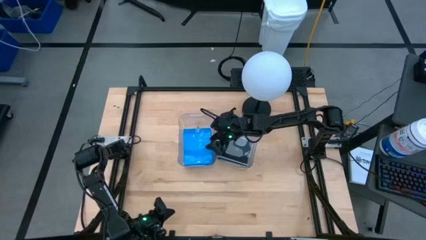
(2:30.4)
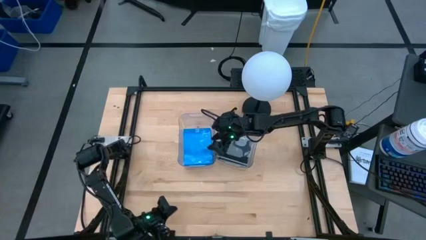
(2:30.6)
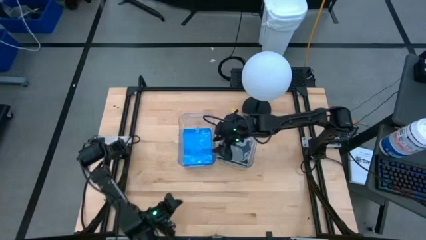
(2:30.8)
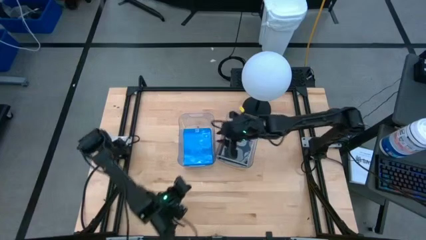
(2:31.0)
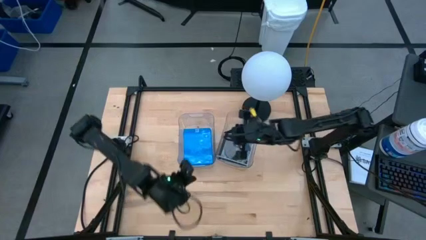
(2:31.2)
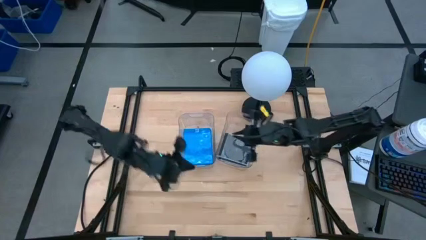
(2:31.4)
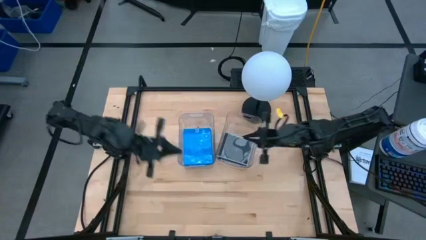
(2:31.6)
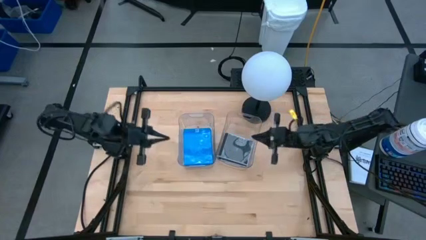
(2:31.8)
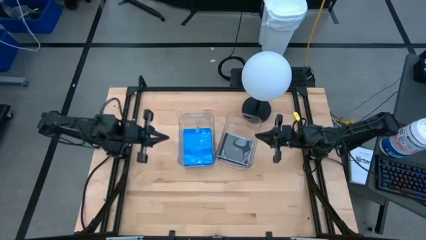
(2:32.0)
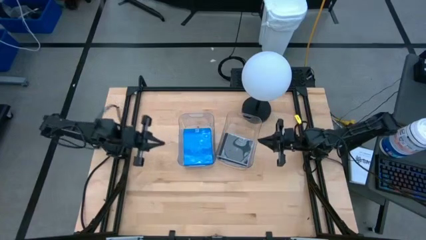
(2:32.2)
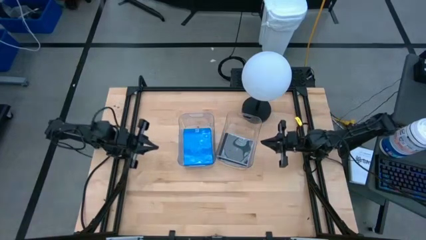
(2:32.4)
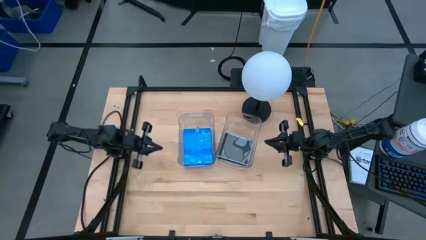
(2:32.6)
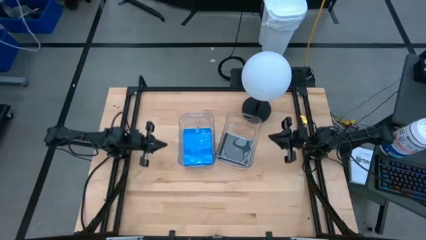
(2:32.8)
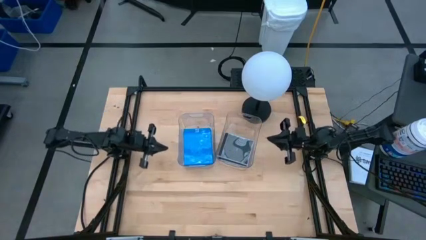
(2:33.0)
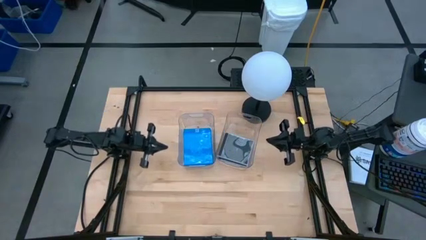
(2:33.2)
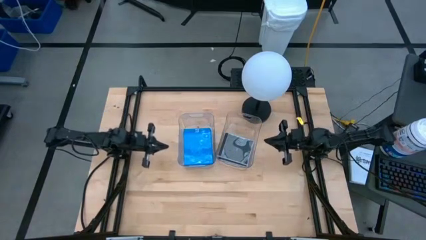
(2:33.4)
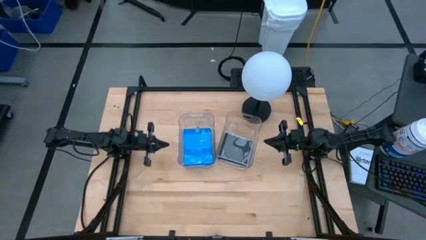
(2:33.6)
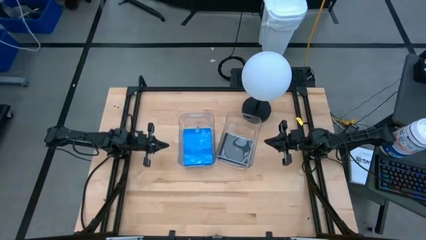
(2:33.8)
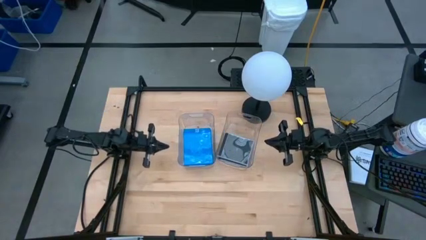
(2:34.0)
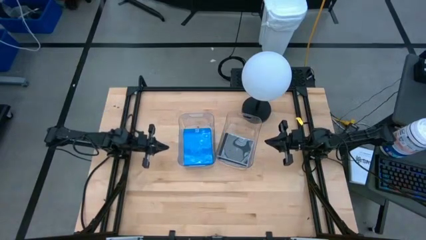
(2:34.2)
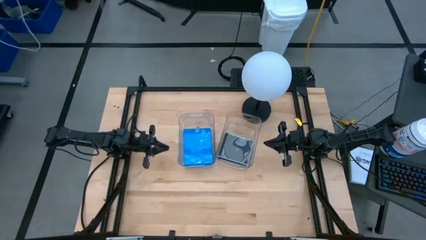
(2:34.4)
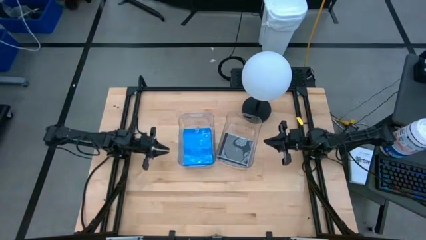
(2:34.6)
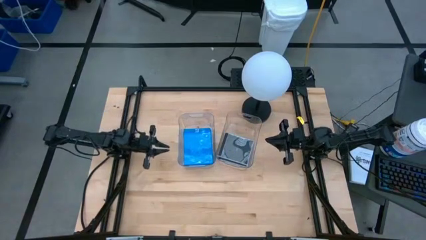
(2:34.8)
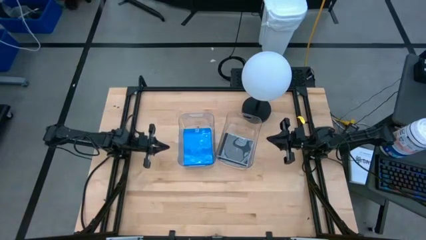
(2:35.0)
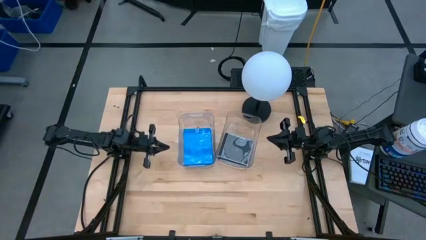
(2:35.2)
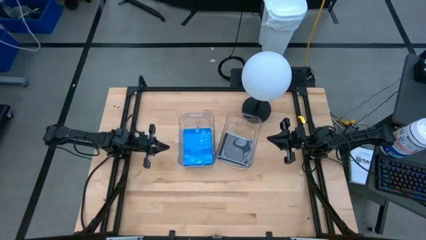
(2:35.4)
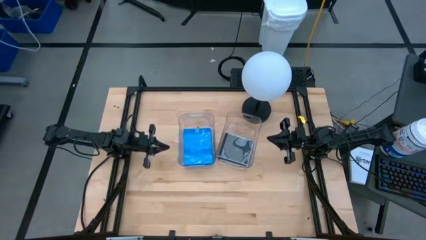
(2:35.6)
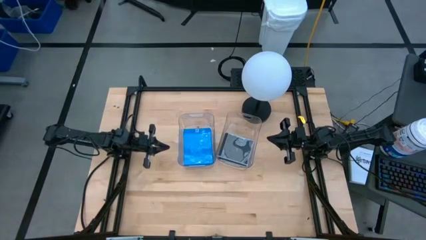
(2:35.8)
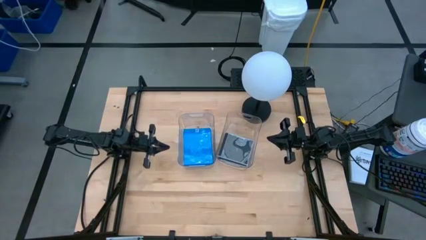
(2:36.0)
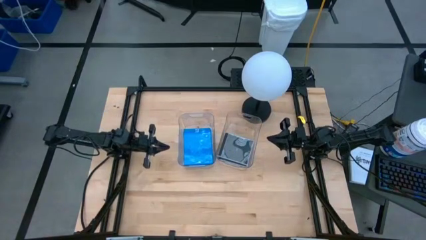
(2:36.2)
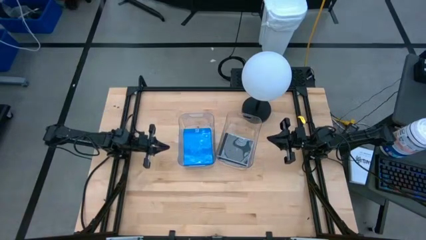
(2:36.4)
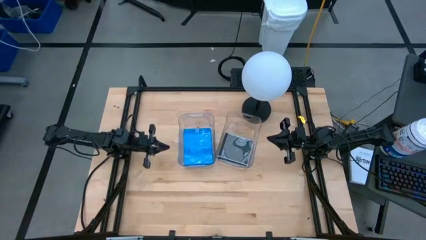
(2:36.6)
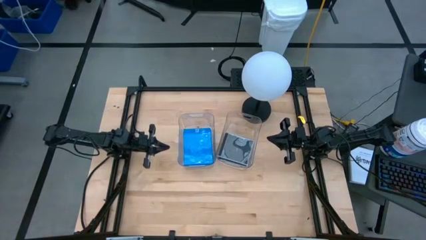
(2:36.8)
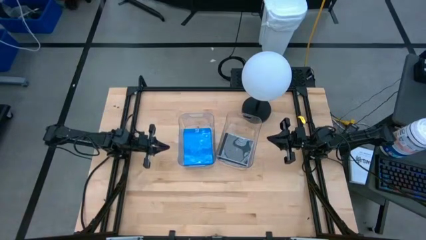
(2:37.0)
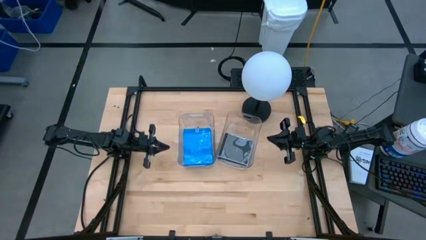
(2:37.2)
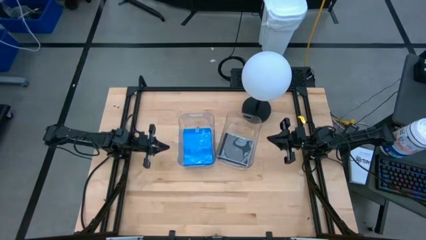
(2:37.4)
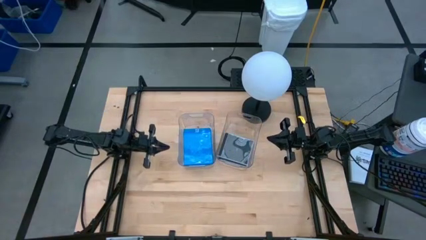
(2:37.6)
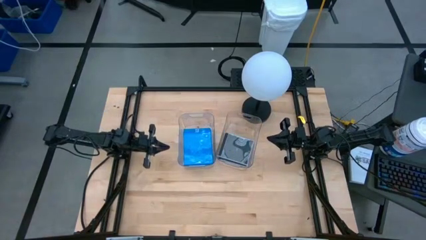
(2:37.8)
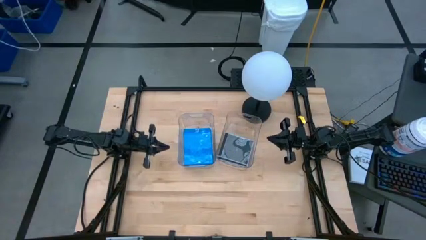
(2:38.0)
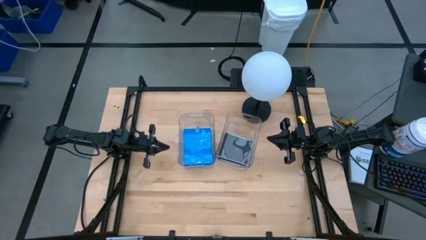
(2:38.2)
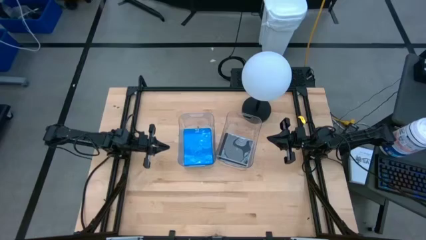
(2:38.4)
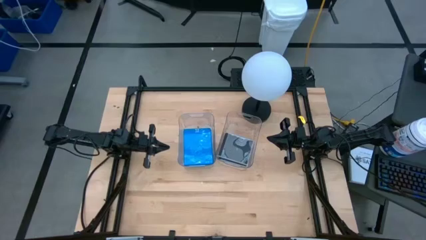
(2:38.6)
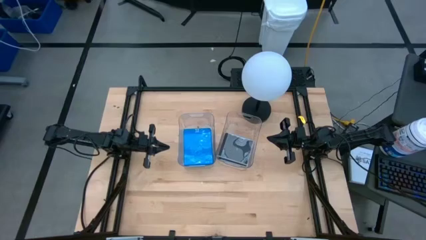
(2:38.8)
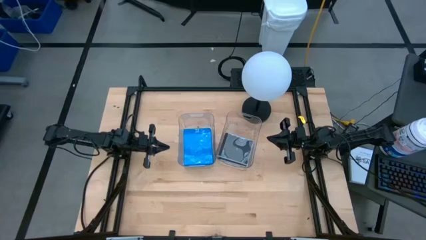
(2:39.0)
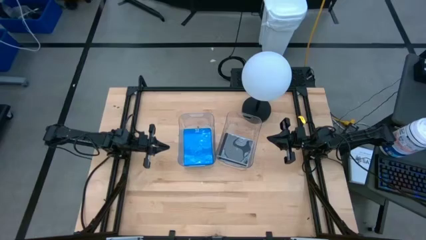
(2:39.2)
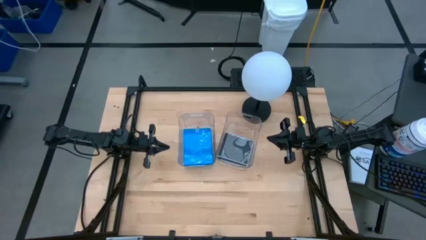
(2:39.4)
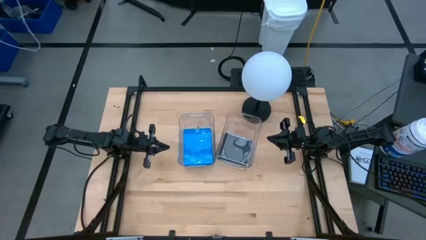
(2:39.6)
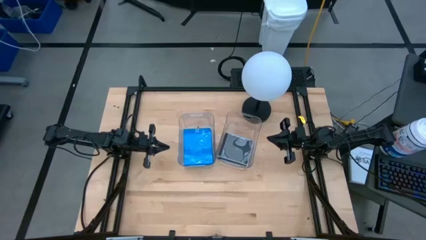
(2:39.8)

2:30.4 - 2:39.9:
Task: Pick & place jewel cases by type
Return to Home Position

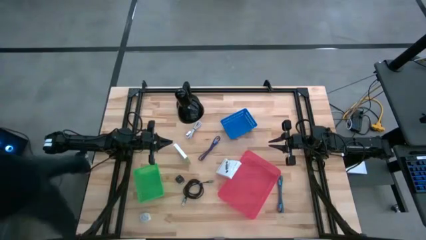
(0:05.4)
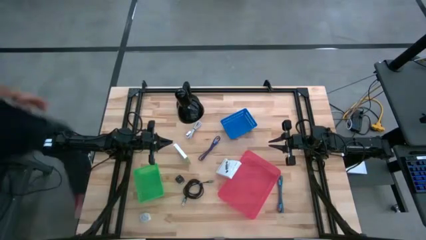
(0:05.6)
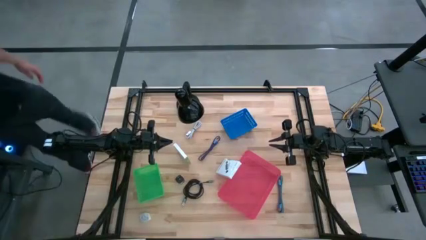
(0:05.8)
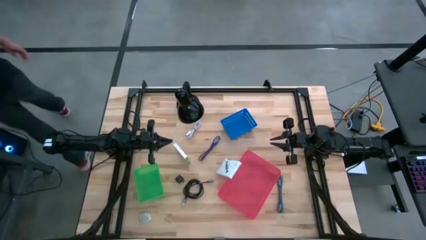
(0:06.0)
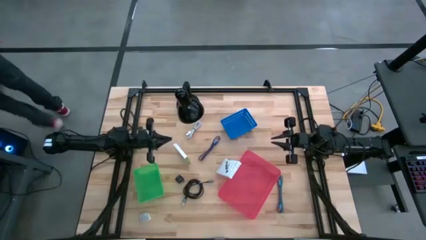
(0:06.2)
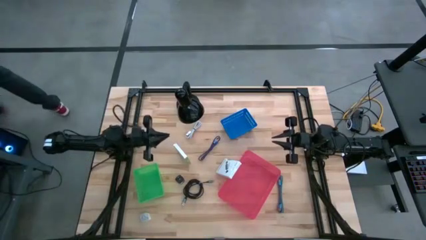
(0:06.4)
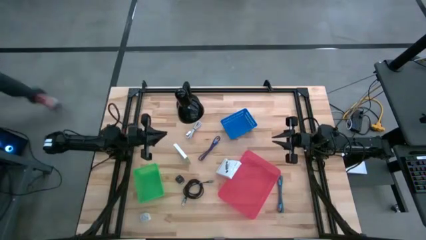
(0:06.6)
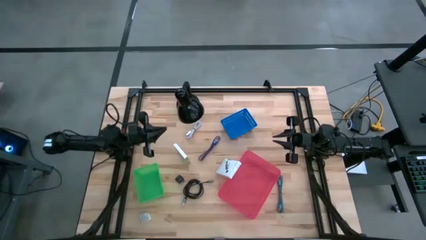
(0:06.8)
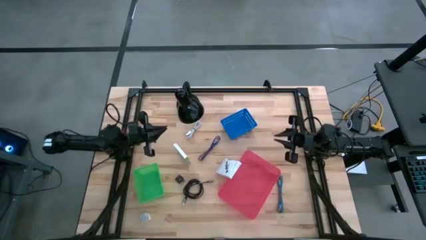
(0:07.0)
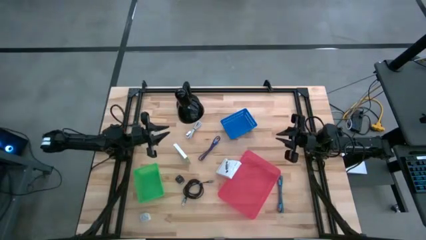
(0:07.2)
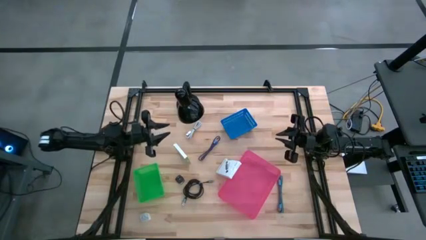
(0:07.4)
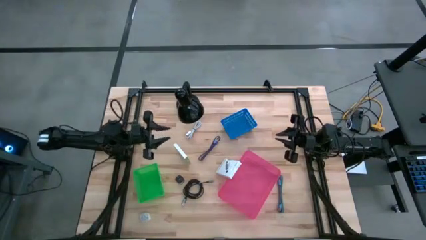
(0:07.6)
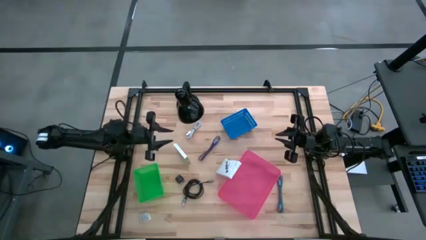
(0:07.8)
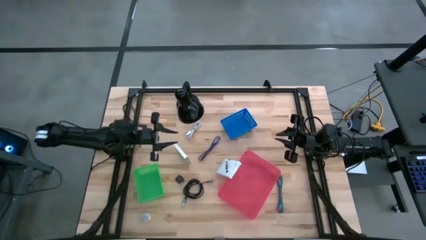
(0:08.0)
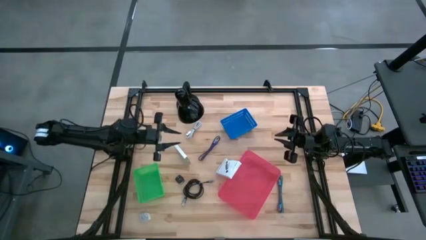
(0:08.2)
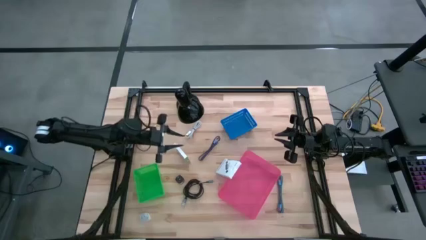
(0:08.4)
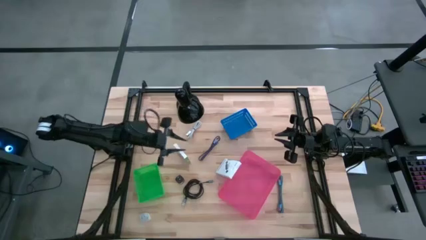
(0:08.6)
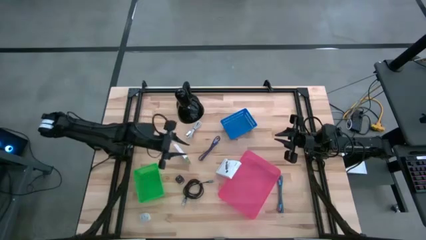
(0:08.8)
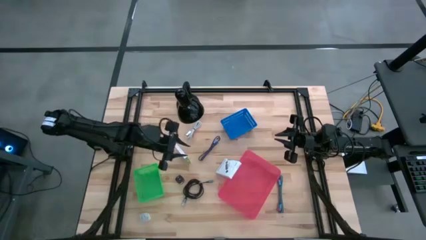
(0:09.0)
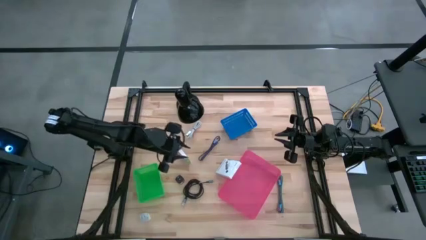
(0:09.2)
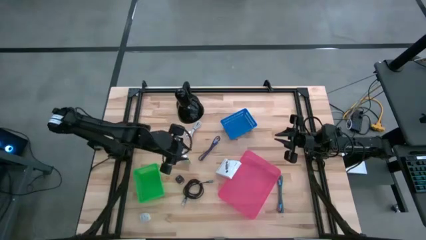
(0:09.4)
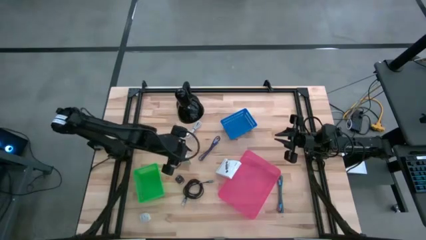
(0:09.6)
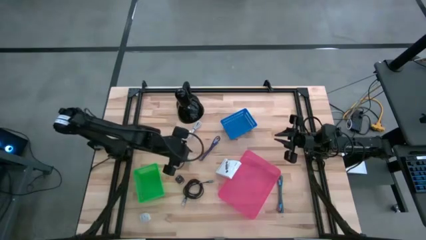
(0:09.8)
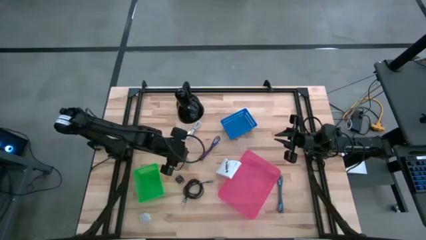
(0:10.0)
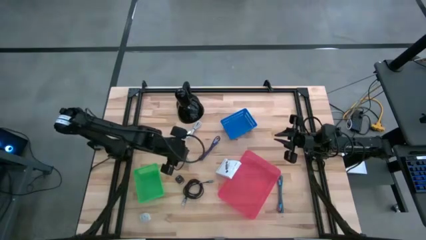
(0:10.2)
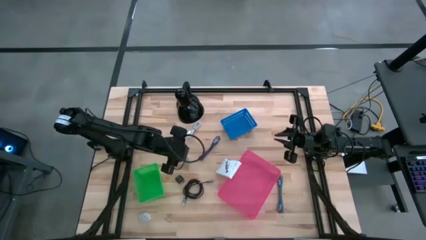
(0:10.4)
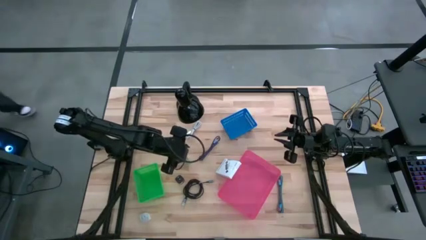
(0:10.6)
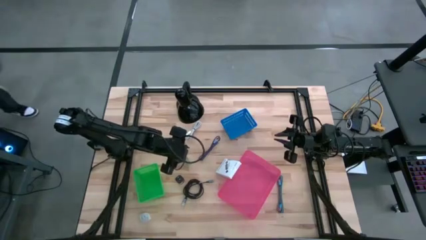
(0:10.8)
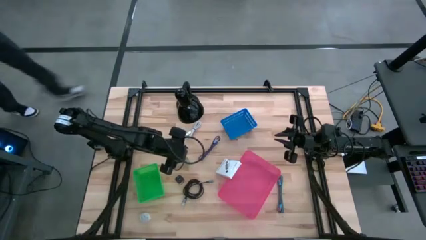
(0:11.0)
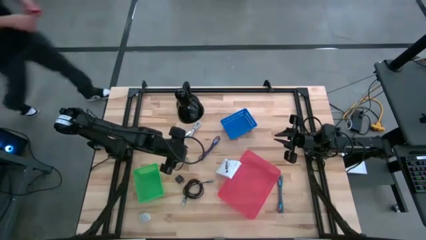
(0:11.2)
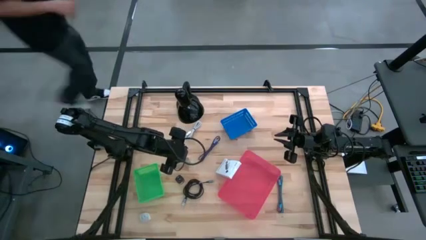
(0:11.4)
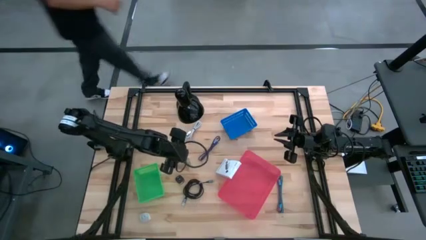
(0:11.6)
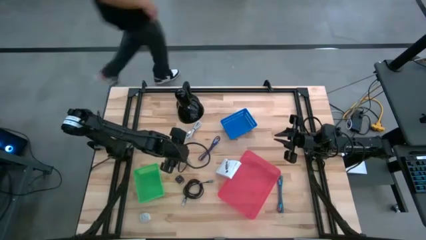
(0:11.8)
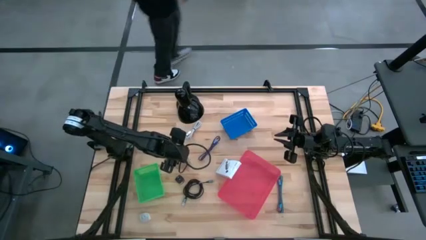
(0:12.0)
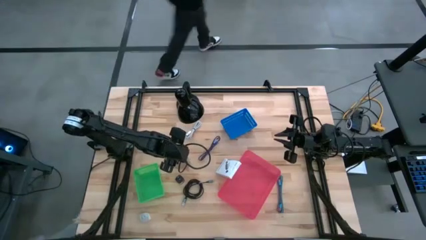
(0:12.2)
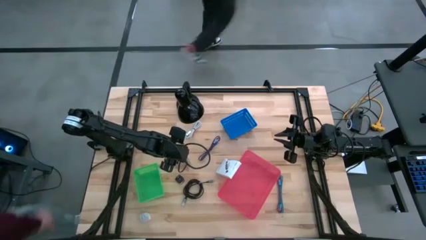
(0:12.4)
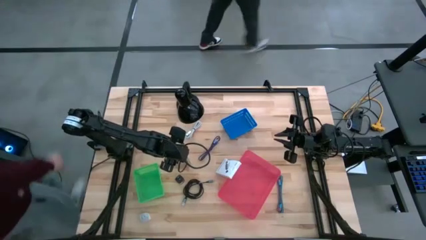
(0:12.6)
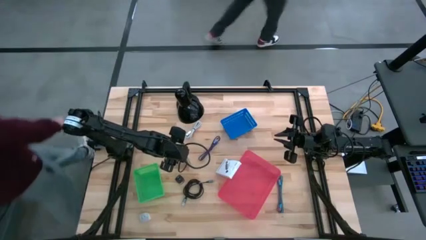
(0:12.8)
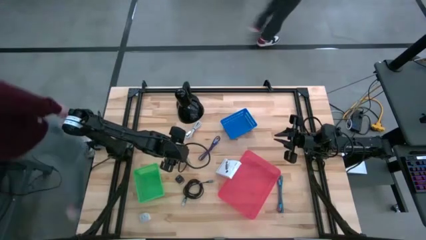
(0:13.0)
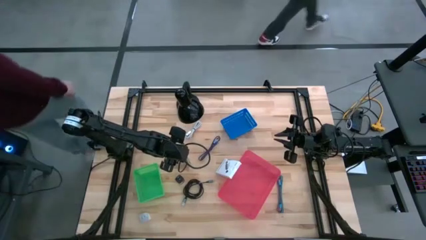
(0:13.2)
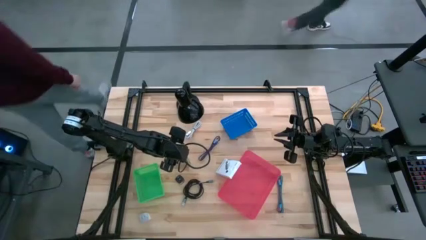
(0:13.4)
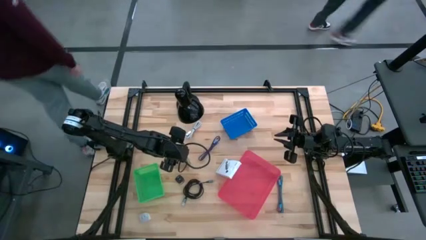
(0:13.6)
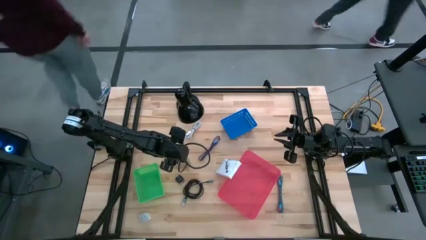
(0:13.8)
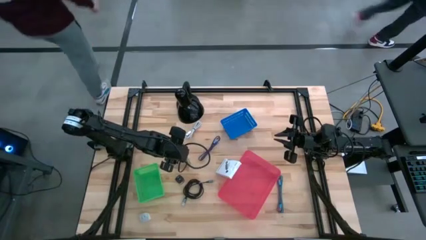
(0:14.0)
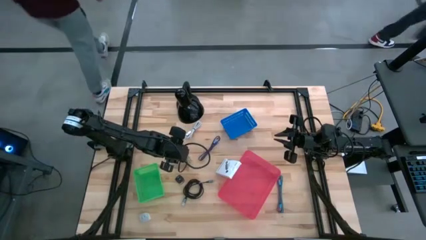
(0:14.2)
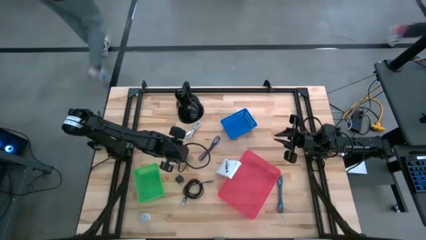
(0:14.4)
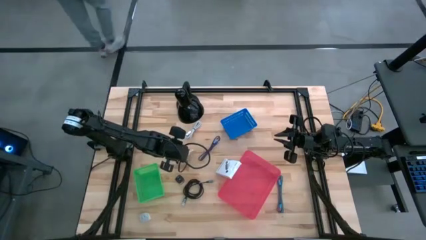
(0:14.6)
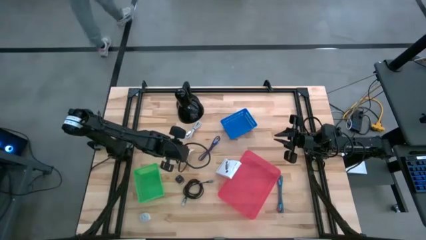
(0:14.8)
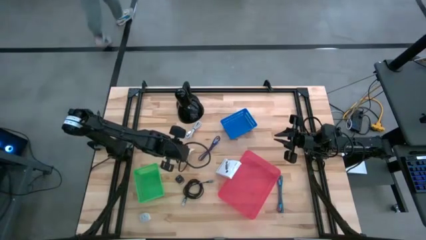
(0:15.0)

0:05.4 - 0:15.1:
Task: Pick and place items into bin
Put the left white card reader box into the green bin
